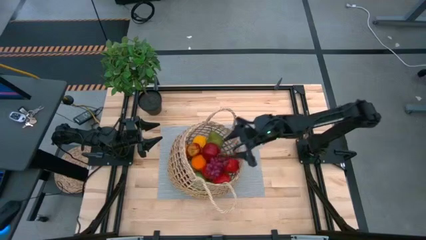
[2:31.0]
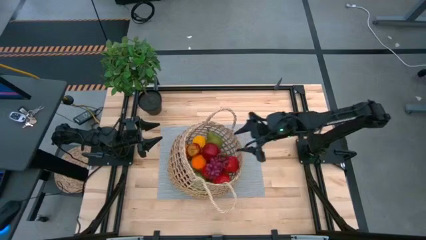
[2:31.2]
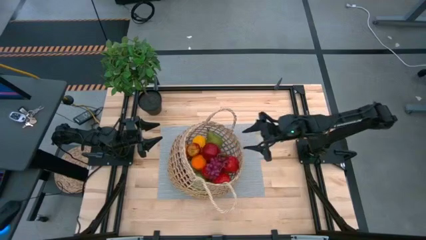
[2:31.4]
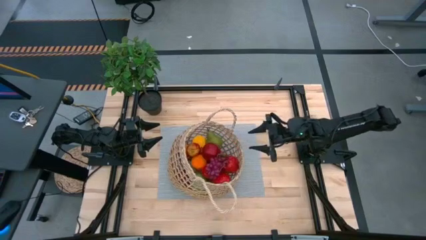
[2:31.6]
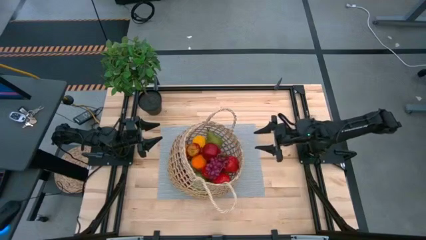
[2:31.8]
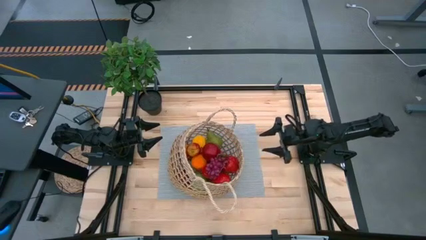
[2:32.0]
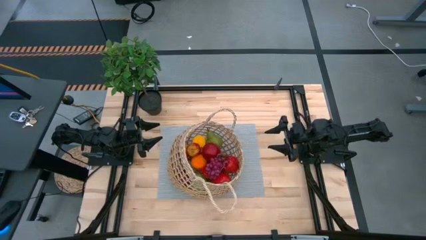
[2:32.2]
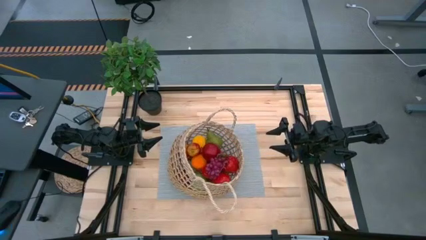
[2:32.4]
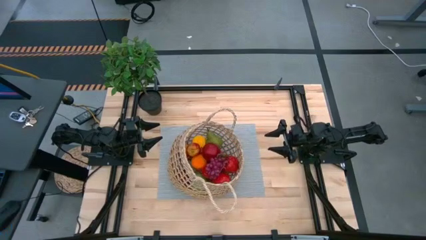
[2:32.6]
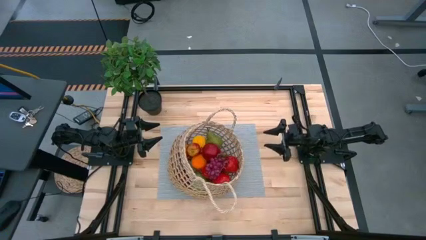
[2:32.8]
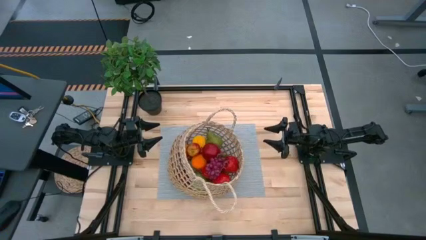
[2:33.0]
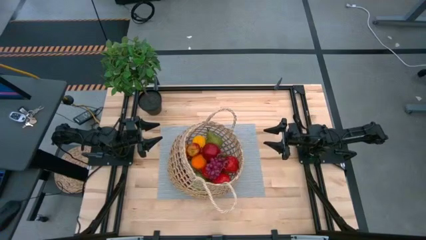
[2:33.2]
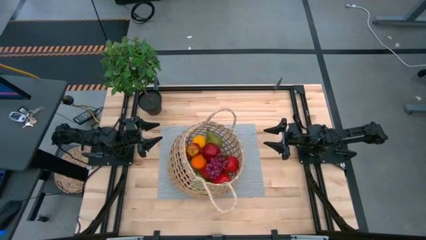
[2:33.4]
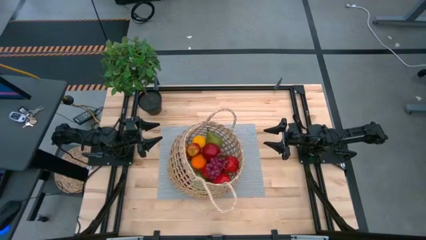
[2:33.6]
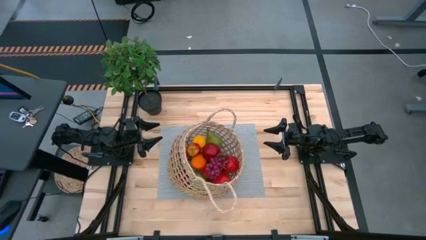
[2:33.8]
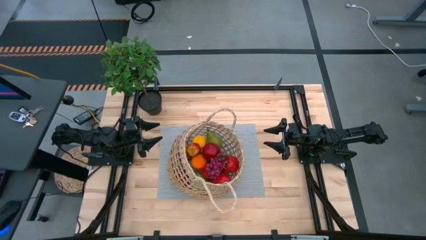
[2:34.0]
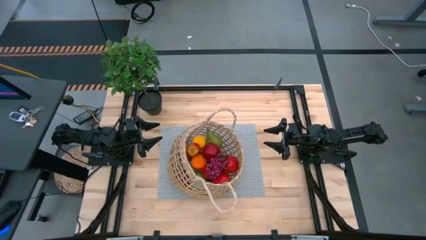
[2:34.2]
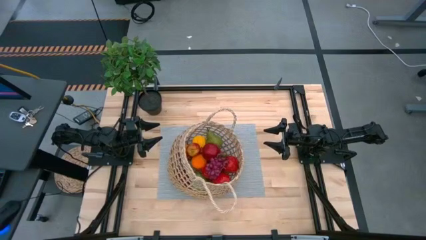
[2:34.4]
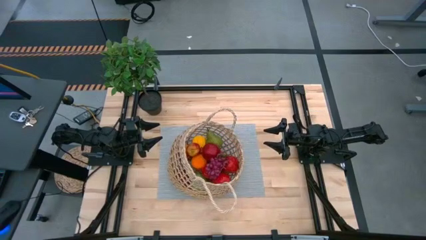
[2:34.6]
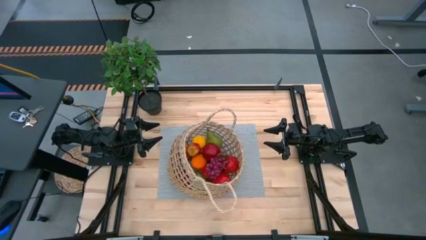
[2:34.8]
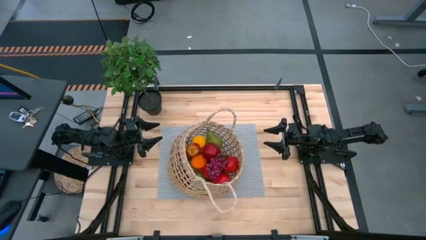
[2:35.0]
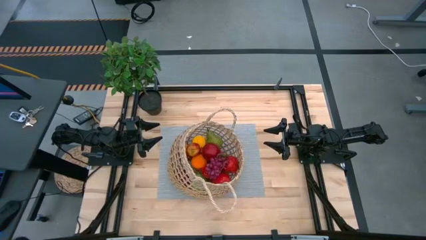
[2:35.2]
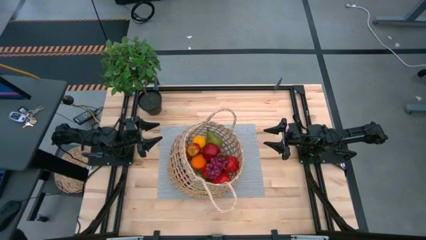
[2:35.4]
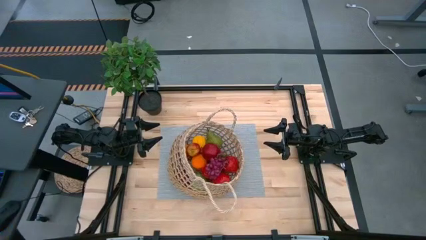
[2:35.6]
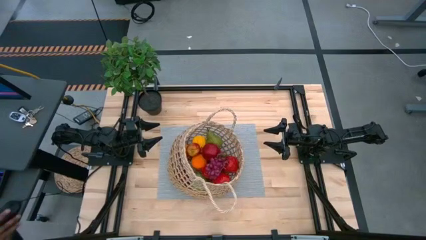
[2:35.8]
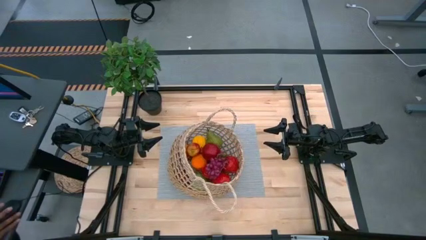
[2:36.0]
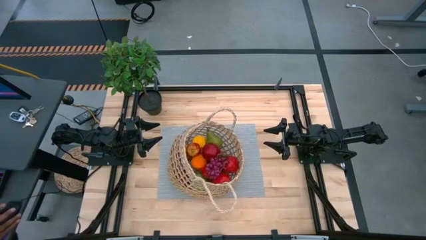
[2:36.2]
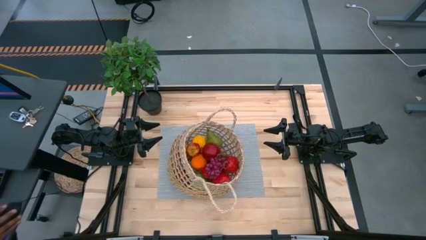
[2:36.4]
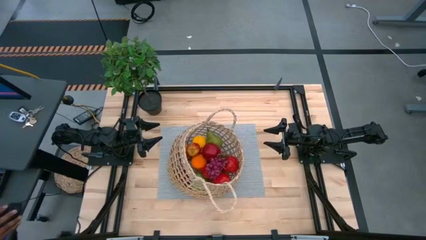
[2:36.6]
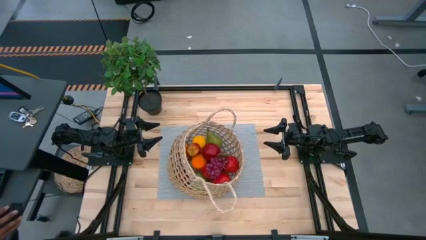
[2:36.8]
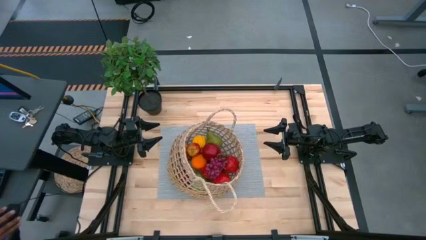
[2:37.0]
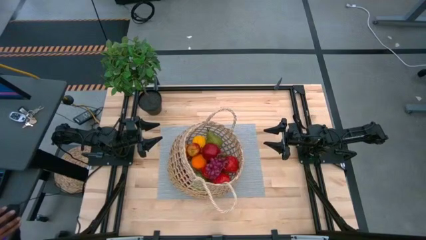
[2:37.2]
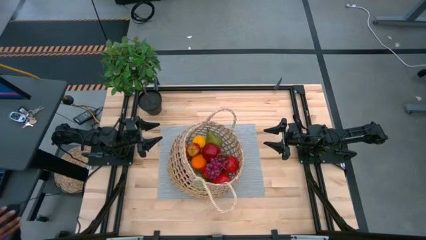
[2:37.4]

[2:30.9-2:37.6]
Task: Build produce basket
Return to Home Position

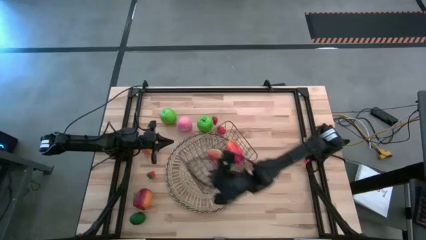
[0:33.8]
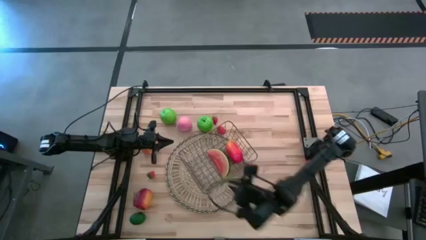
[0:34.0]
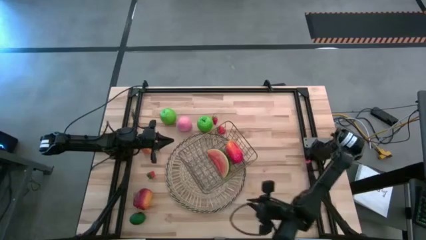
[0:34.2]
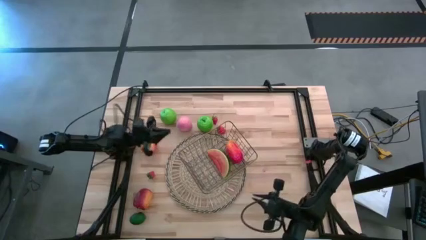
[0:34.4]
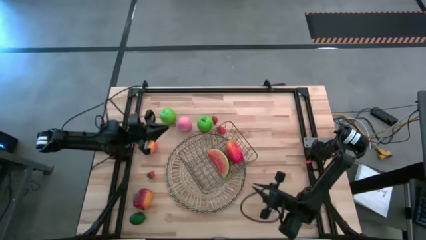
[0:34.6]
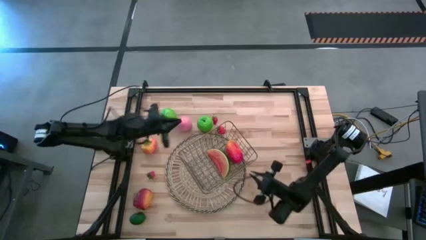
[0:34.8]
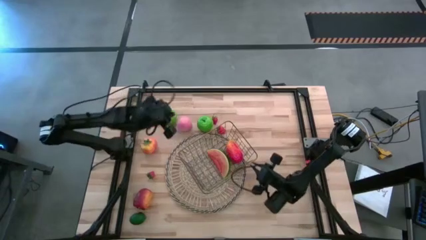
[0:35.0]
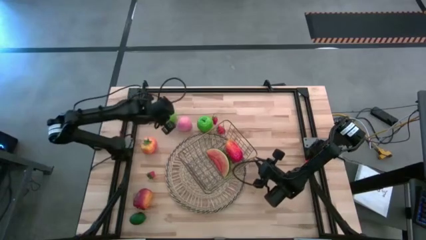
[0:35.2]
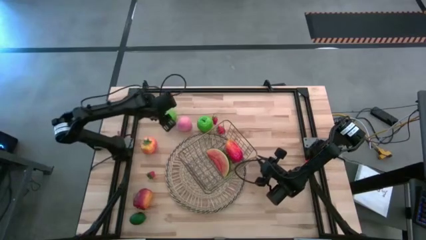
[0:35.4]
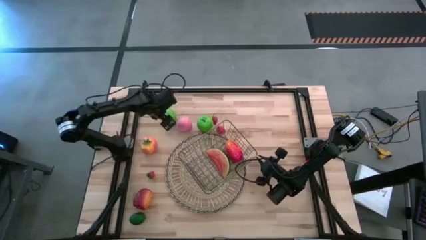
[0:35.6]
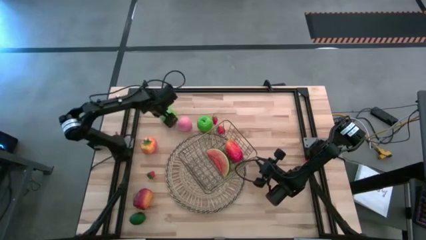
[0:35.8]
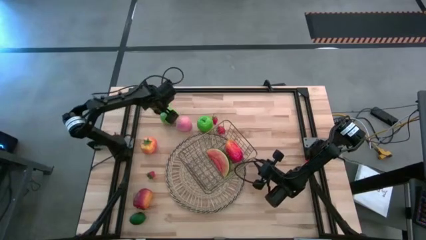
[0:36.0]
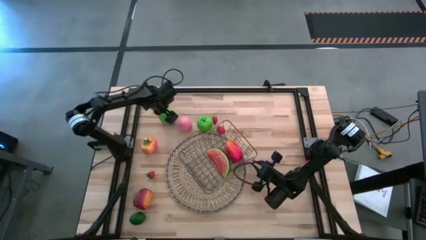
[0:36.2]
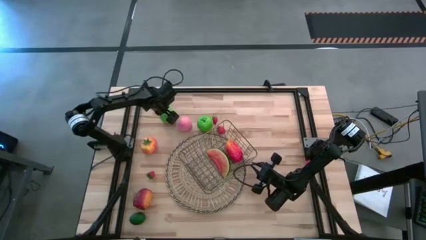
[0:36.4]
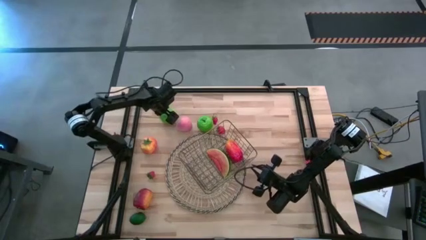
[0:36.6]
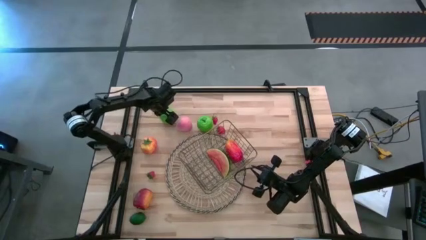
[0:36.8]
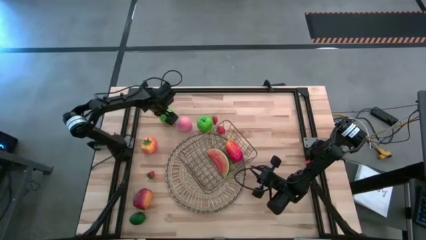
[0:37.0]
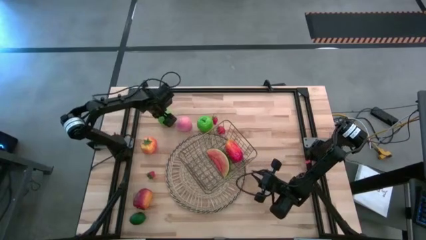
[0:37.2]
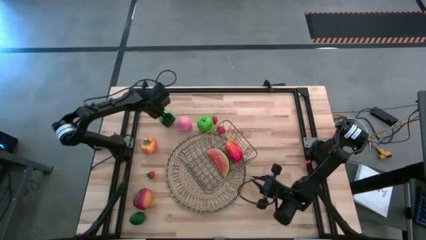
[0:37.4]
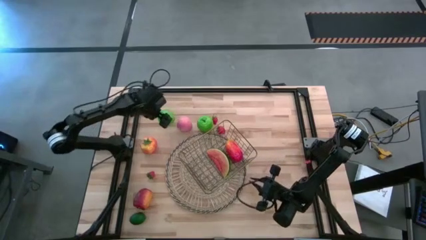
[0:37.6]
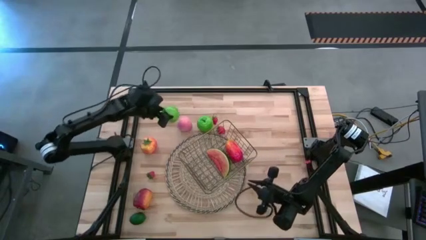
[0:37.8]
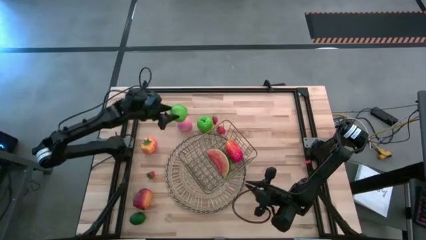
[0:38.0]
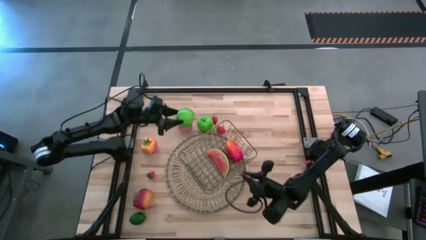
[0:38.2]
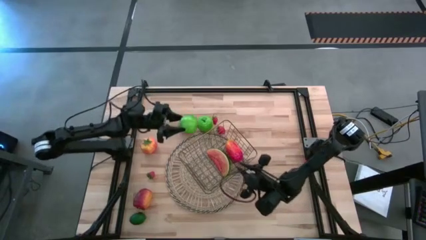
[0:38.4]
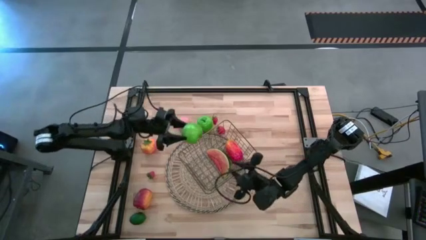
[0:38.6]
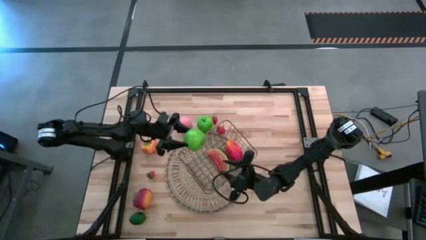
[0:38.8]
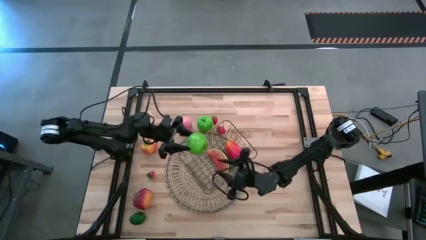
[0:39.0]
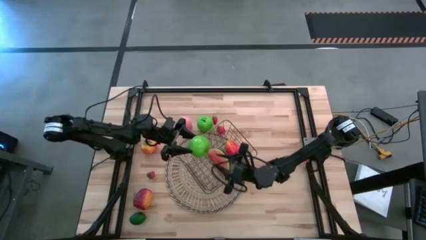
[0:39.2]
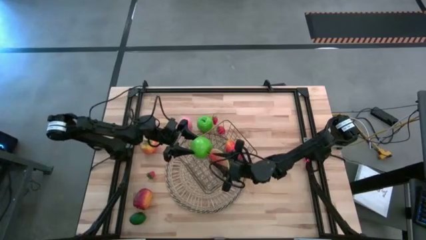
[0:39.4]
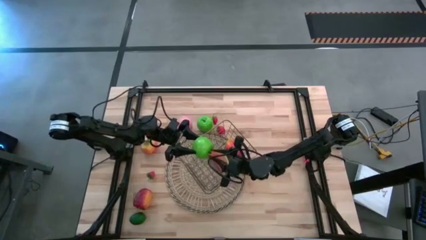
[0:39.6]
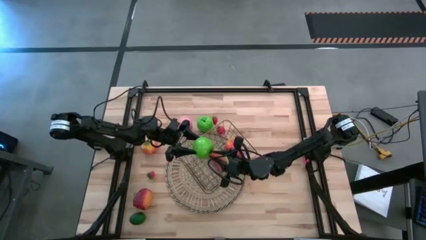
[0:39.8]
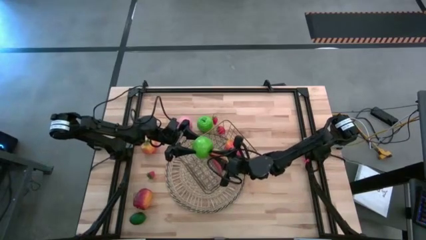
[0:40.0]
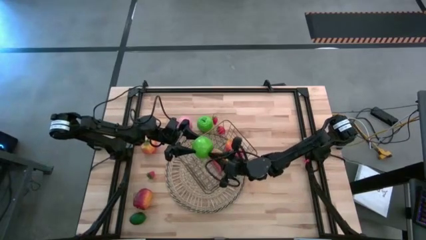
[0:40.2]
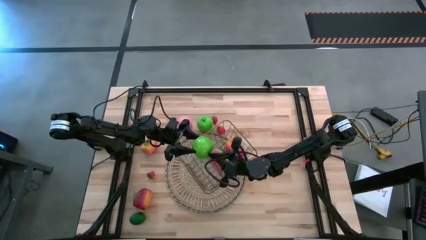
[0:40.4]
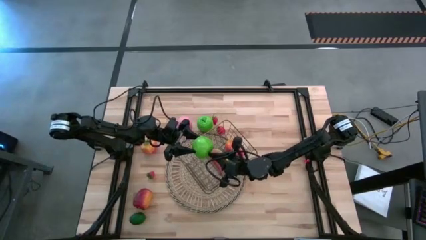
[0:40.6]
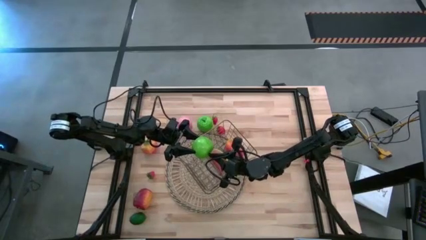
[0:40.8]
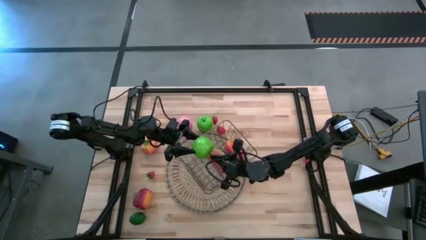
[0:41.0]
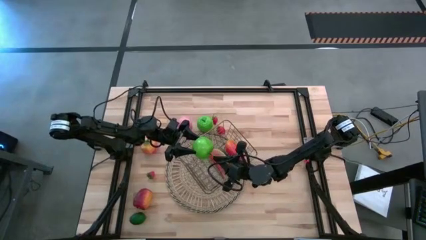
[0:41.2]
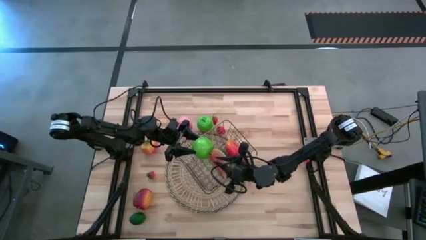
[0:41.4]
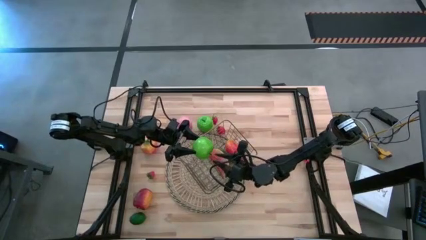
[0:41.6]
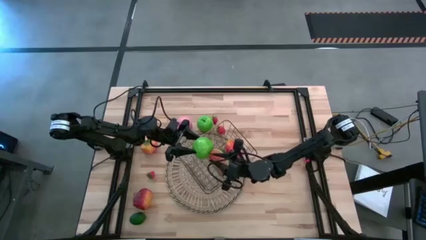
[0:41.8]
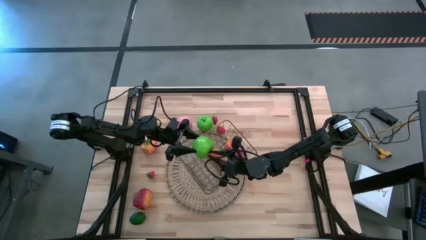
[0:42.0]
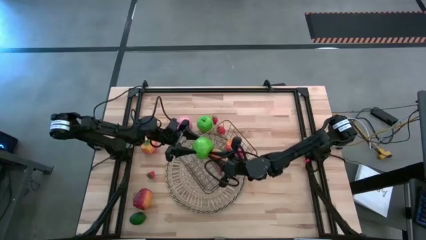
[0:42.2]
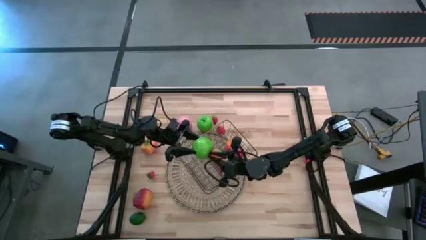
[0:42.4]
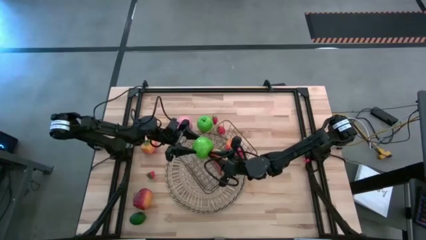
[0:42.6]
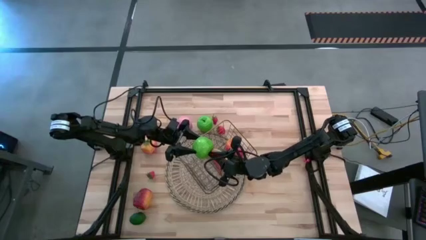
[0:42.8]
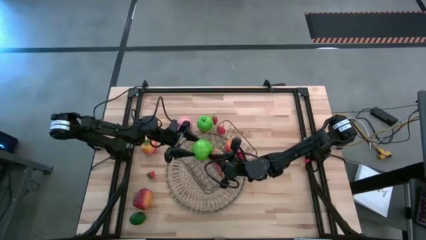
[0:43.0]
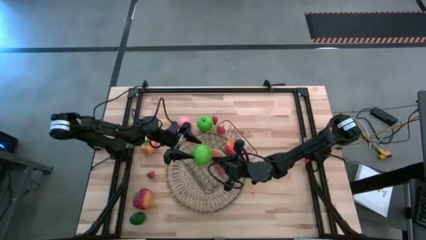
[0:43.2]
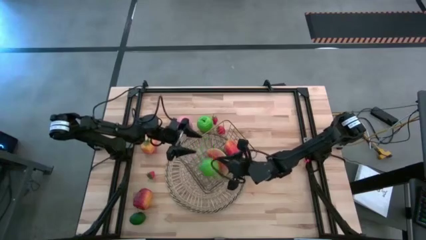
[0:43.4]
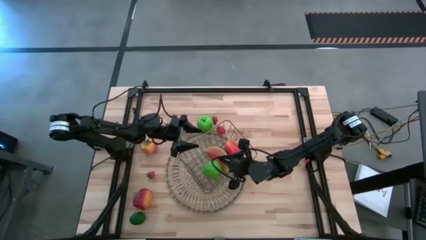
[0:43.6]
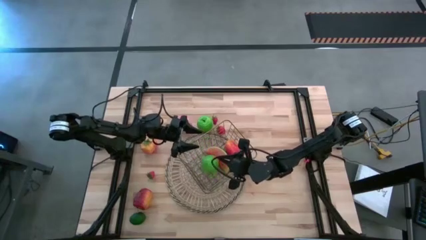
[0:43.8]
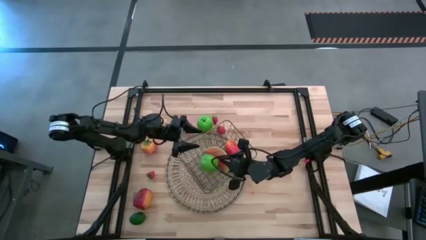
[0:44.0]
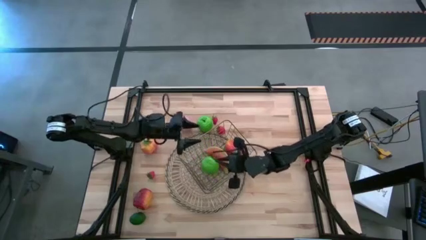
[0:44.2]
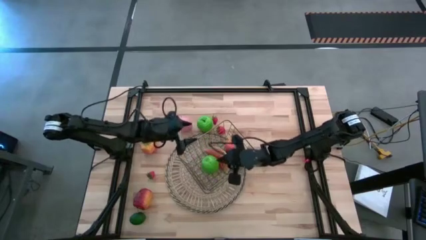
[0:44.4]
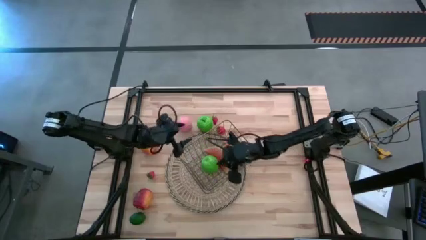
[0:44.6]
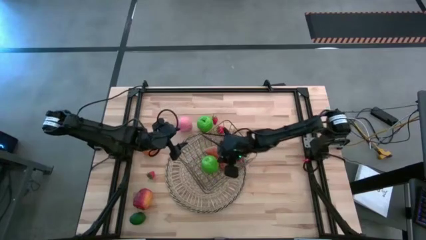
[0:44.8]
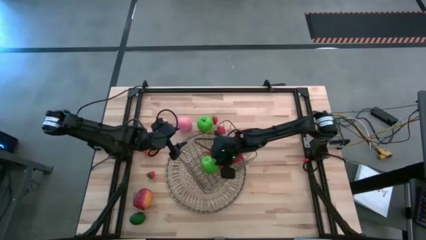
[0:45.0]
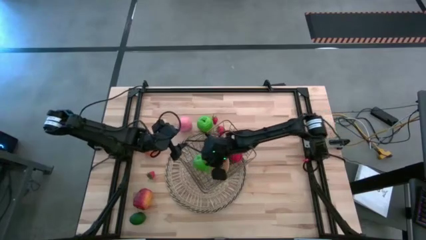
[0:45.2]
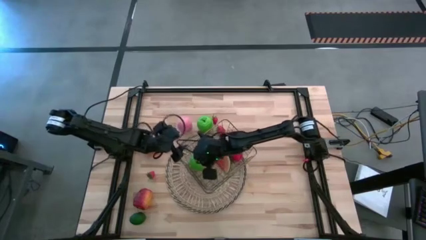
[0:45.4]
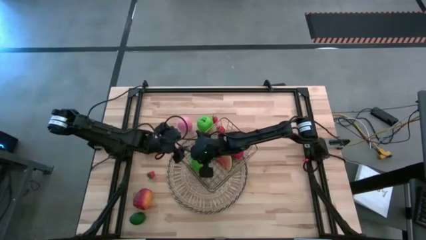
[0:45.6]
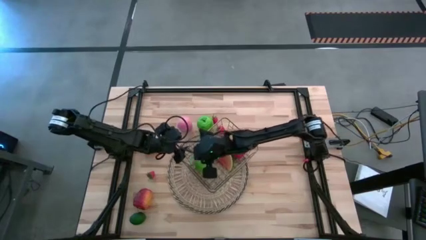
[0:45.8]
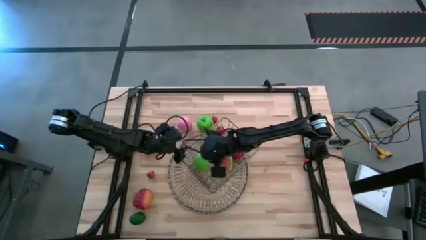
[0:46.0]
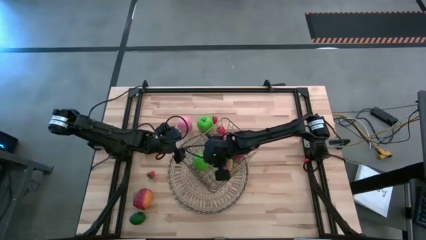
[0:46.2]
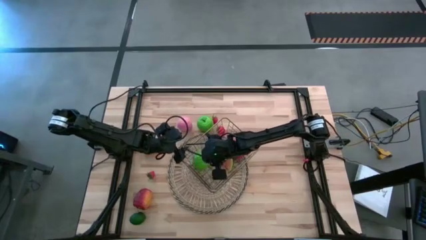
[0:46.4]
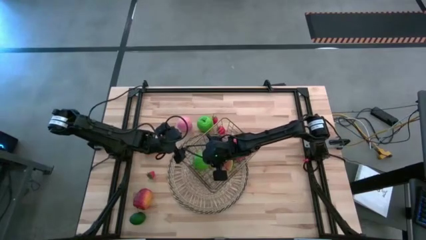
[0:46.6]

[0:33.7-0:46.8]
Task: Build produce basket
Put the left green apple into the gold wire basket
